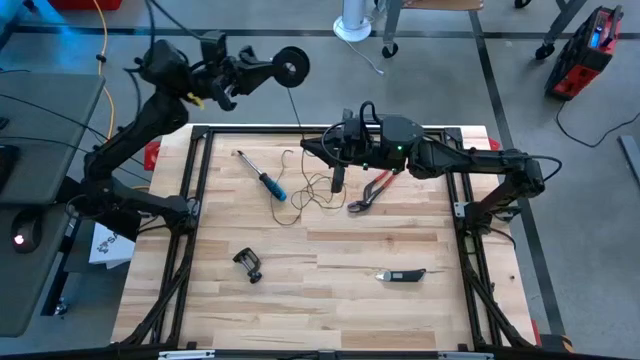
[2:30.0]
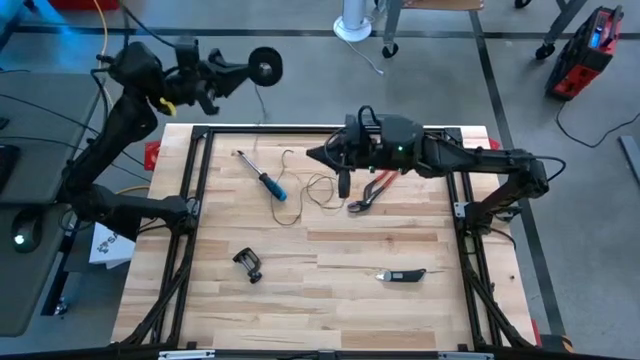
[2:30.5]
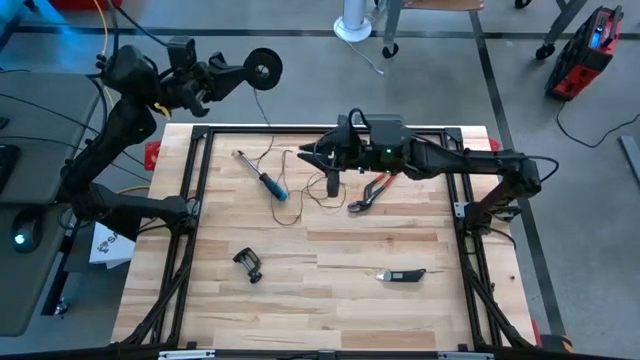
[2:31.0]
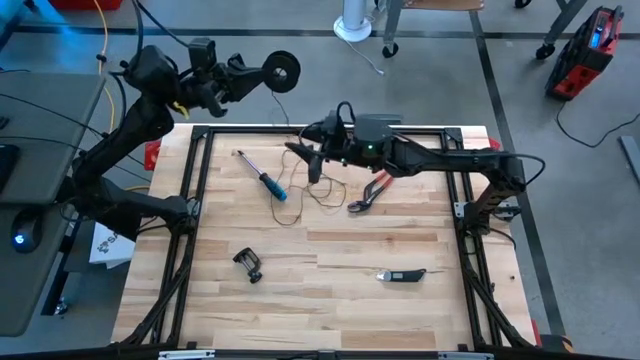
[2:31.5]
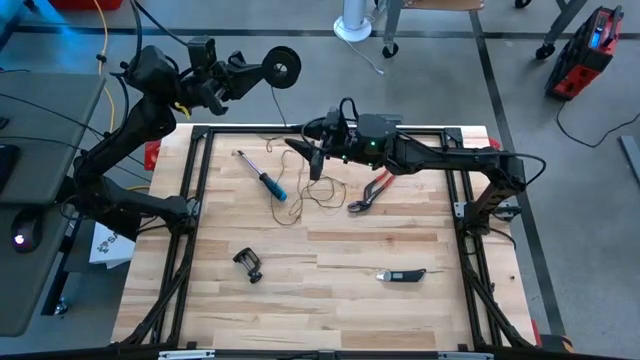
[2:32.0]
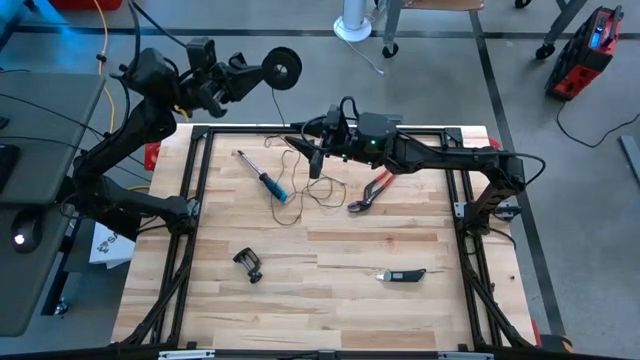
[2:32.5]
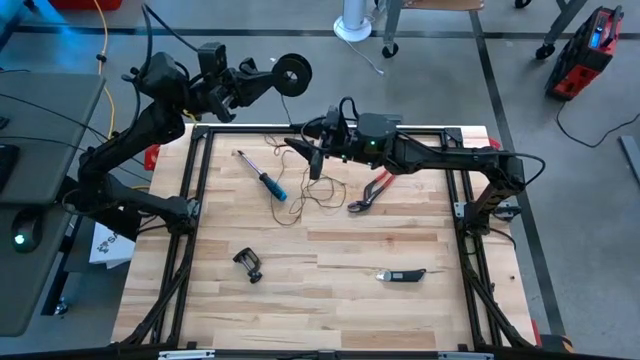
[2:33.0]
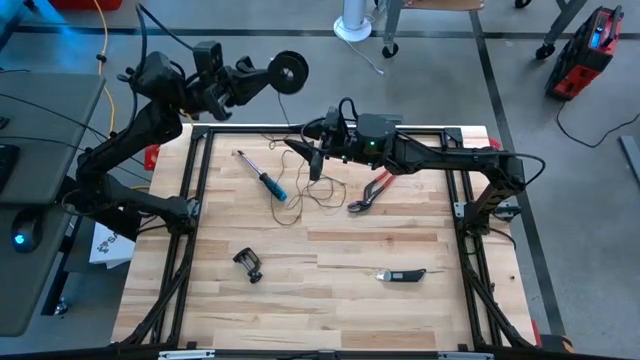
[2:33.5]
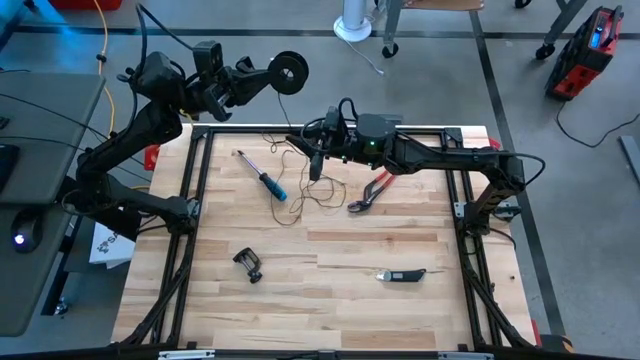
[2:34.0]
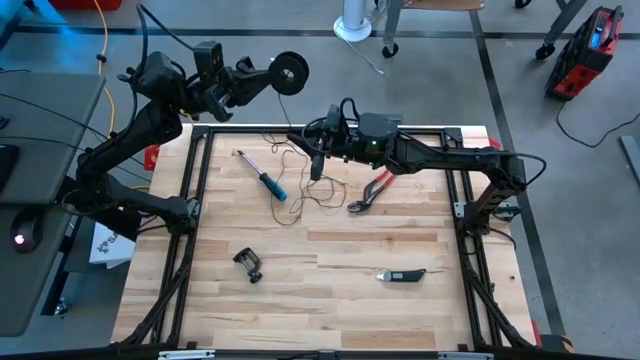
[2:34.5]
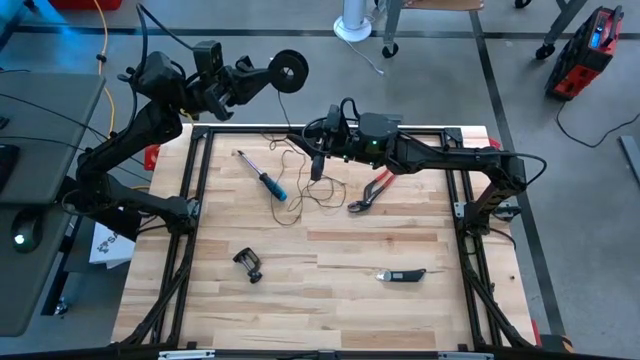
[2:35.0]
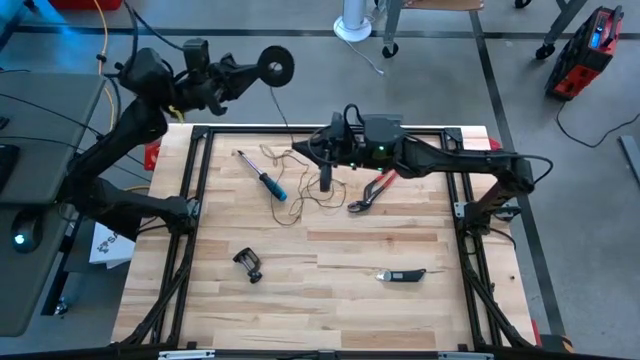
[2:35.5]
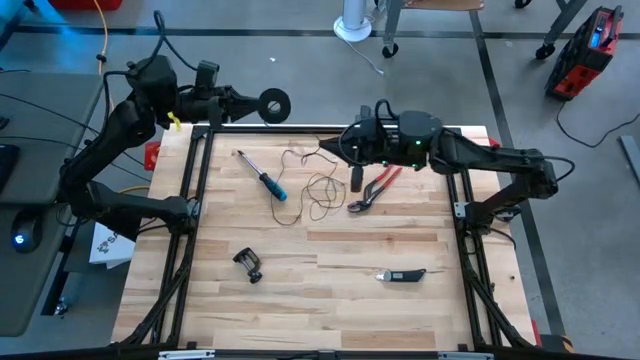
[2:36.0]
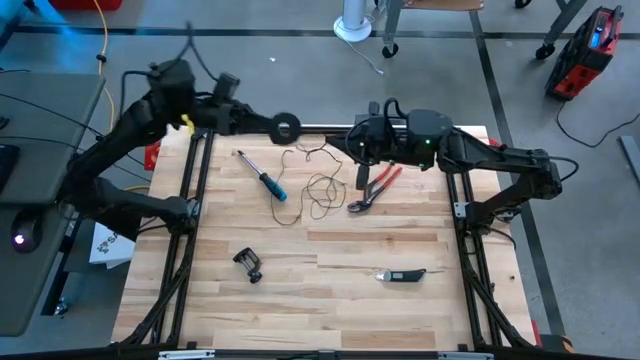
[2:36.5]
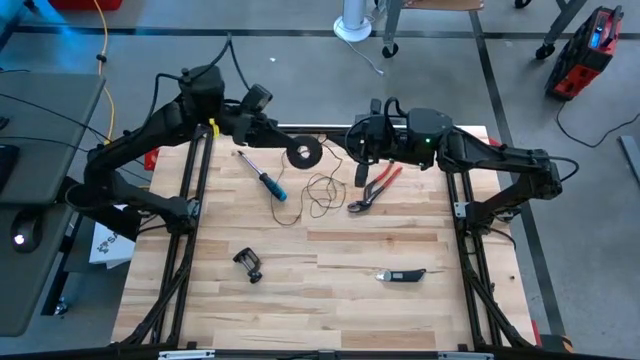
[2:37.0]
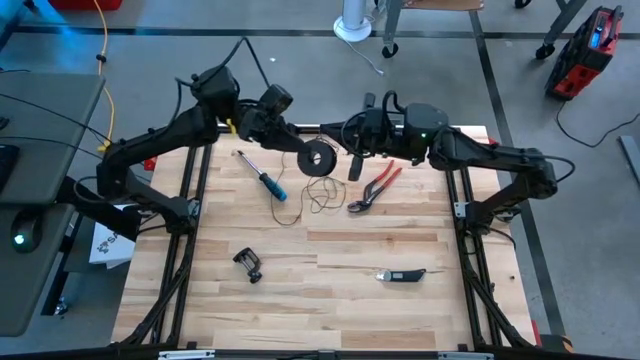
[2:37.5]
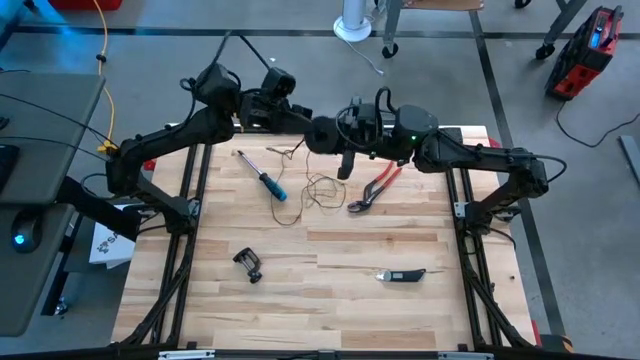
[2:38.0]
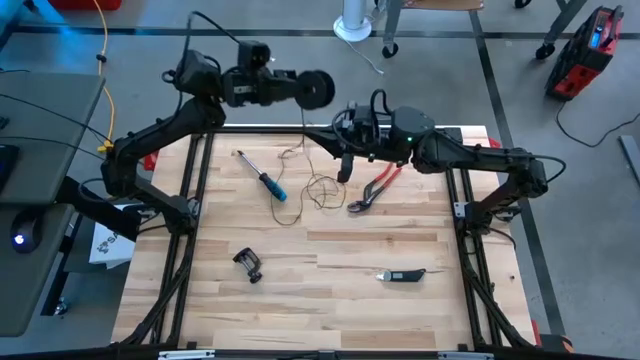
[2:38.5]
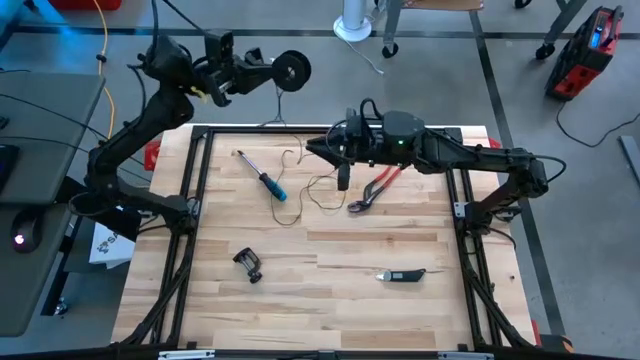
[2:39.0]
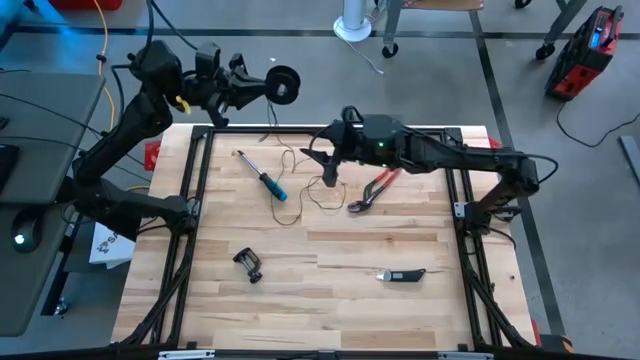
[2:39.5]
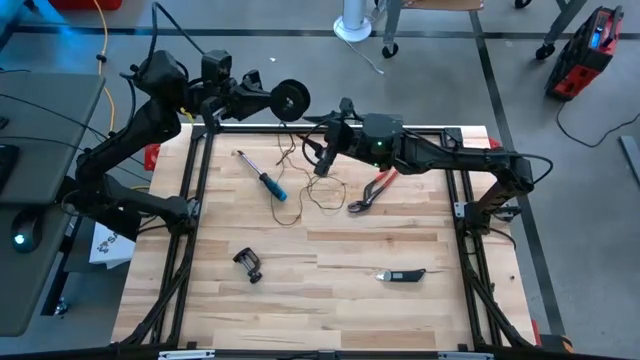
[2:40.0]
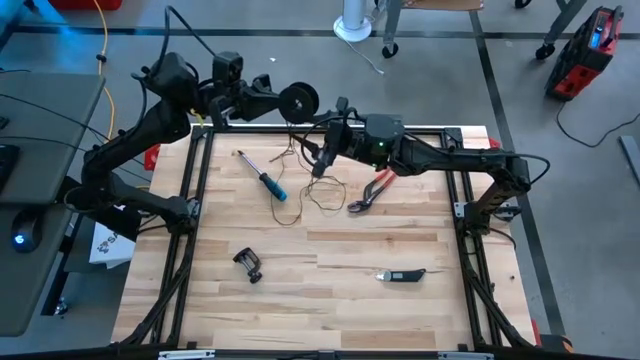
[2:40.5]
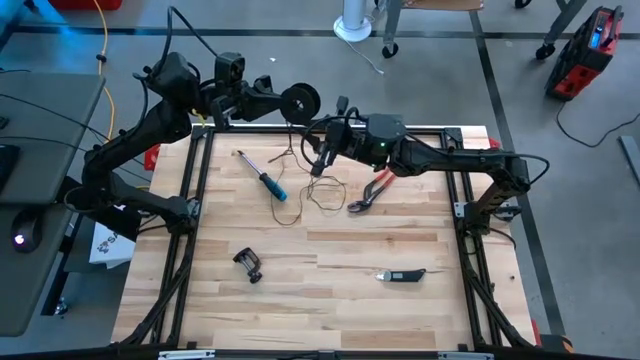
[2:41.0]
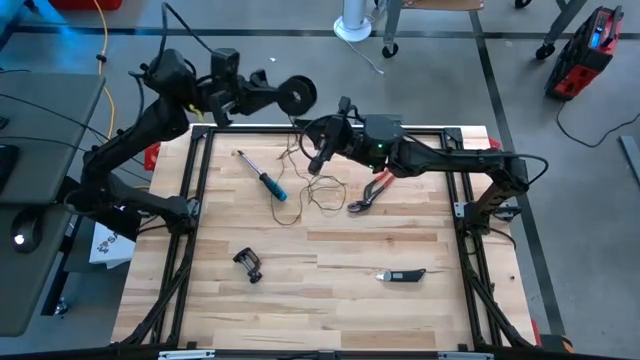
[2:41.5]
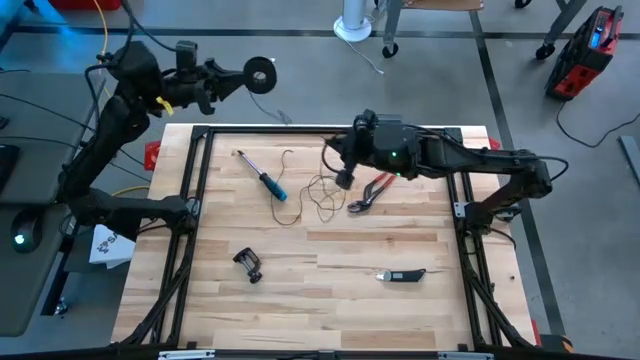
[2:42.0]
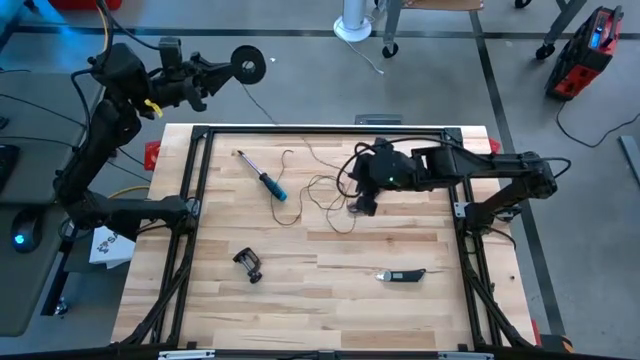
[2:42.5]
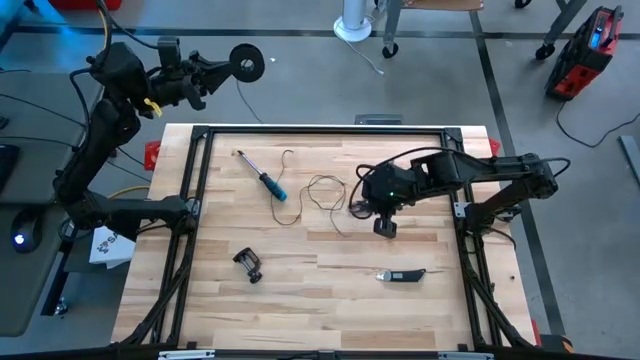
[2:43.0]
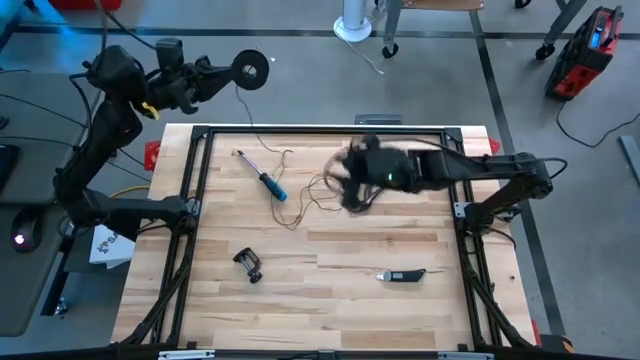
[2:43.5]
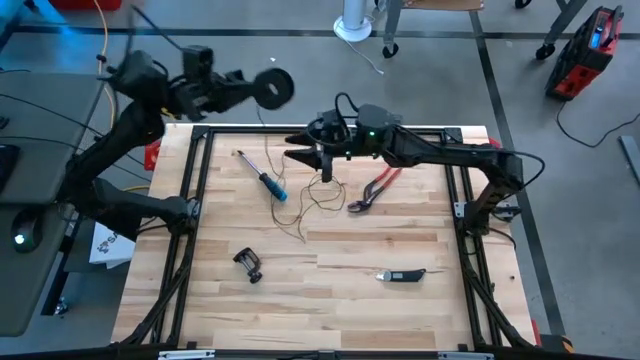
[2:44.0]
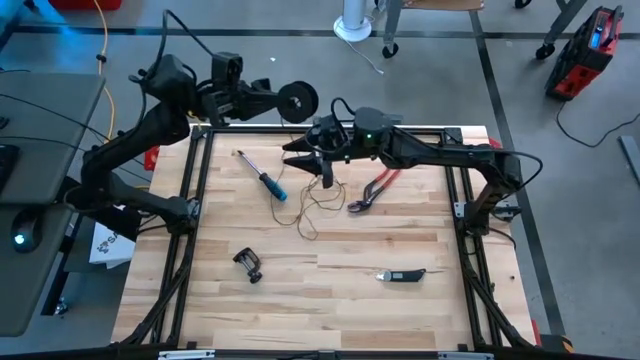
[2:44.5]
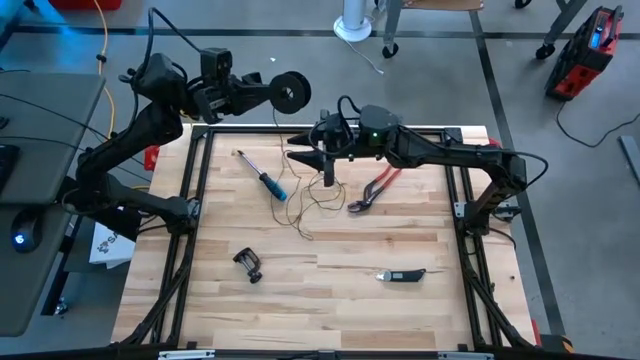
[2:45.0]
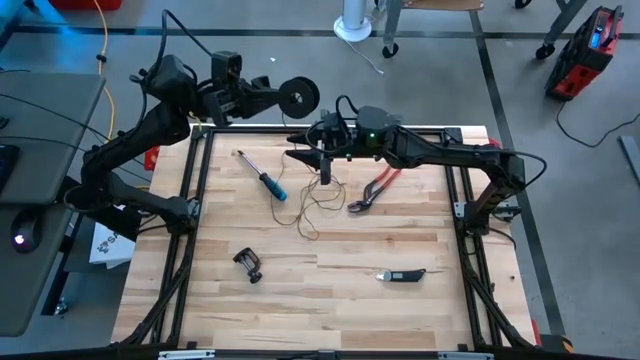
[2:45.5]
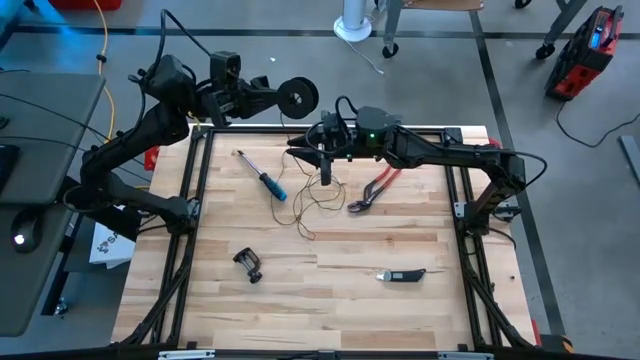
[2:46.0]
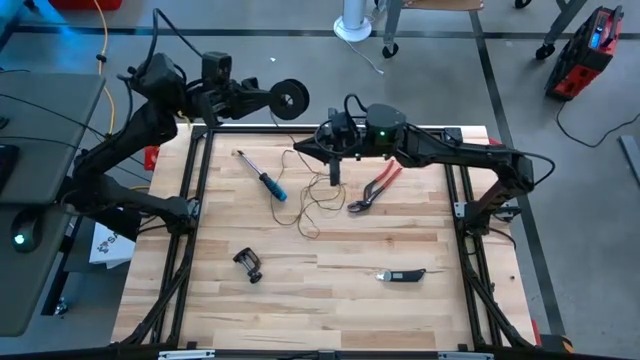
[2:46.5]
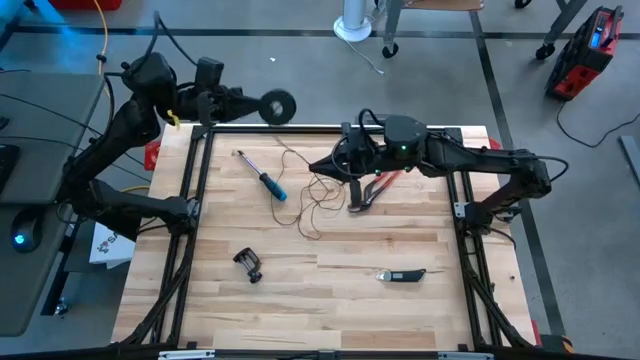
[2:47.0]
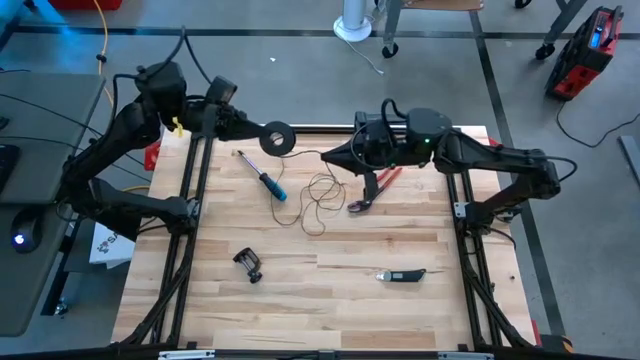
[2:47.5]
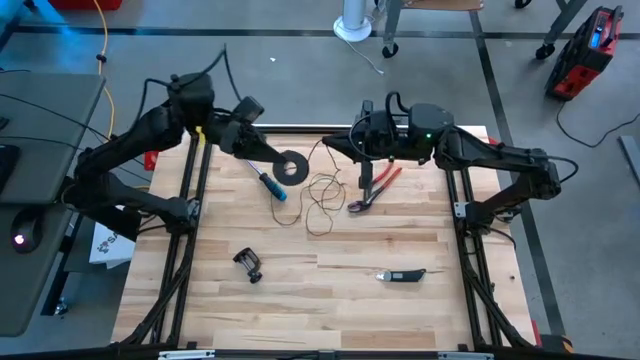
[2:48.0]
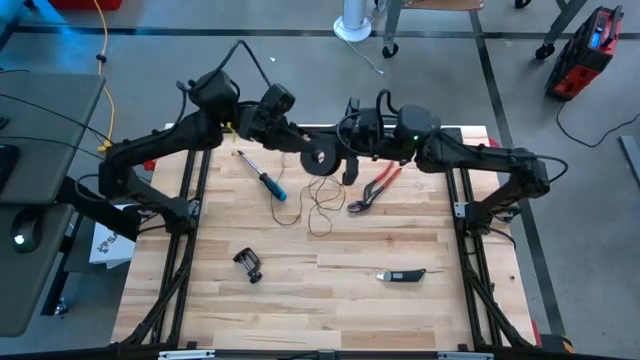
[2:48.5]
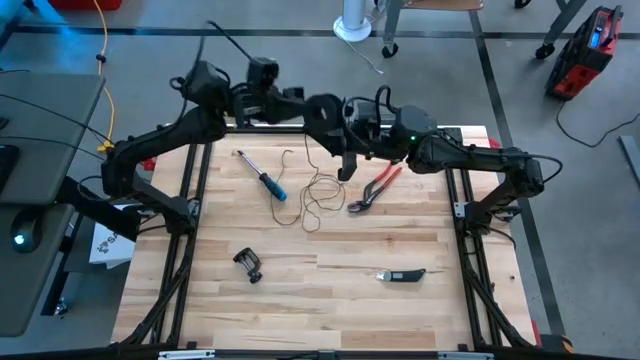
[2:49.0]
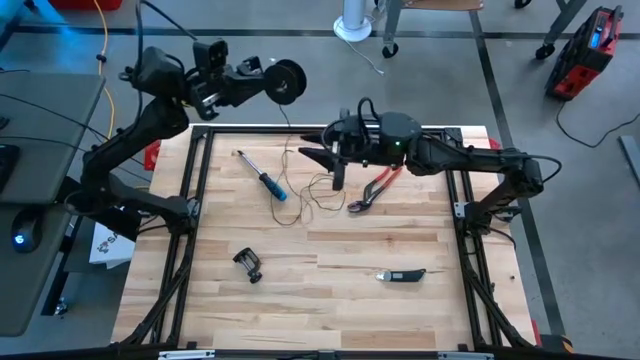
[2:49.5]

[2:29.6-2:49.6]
Task: Coil cords
Coil the black wire onto the black spool

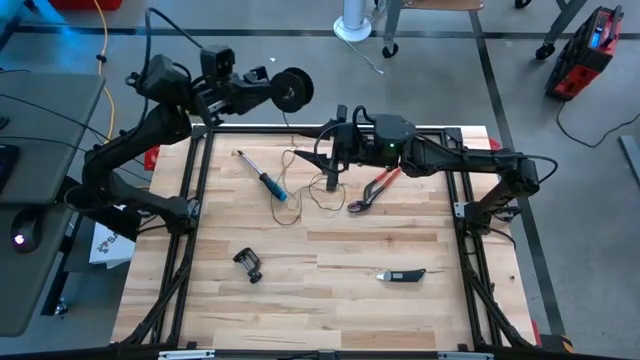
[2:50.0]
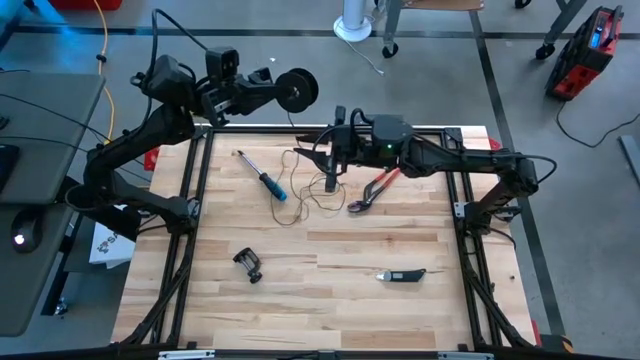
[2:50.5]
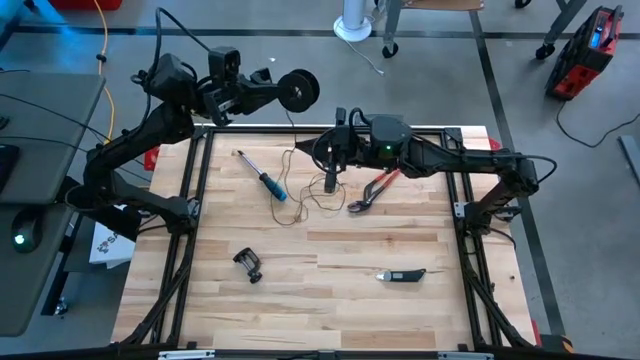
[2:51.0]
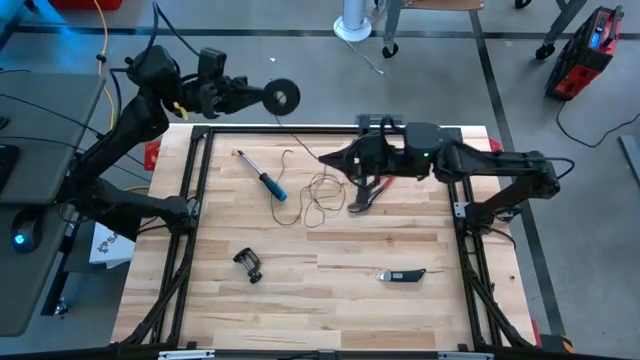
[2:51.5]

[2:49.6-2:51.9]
Coil the black wire onto the black spool
